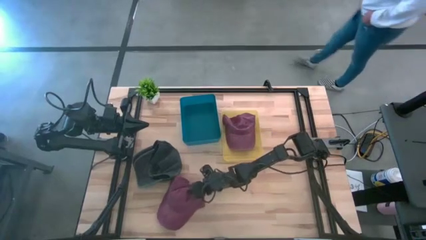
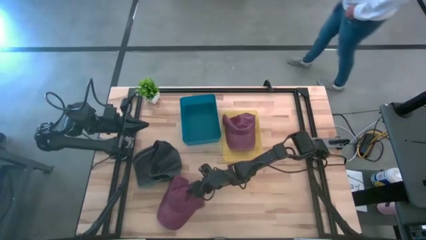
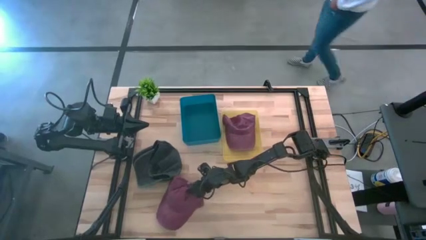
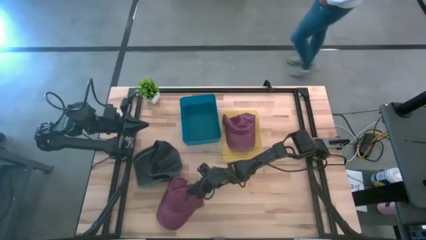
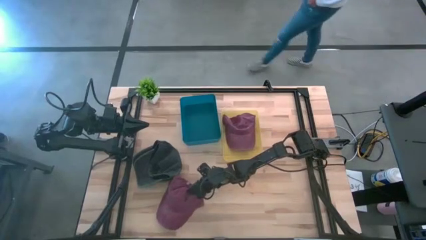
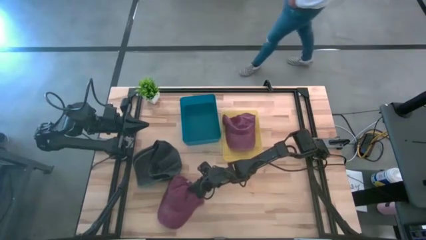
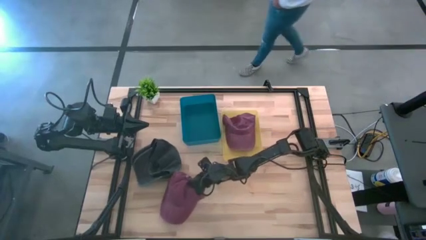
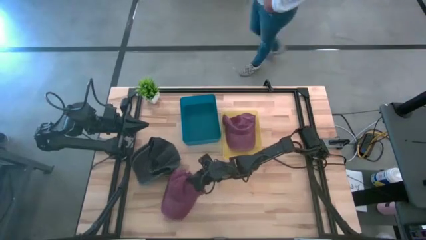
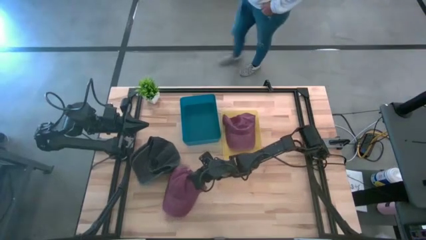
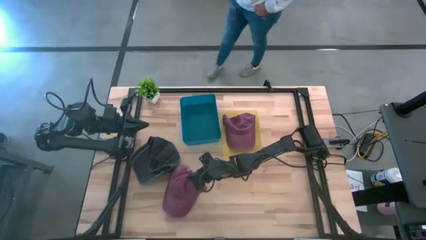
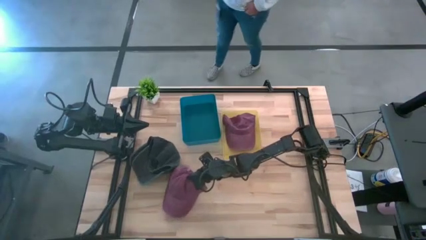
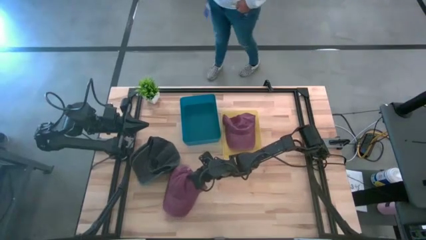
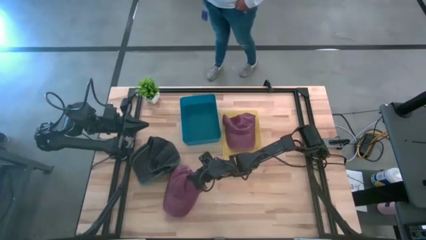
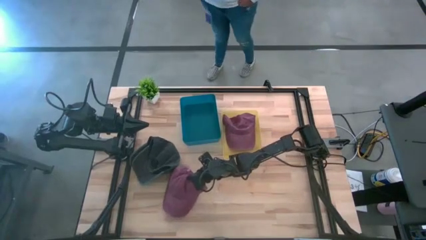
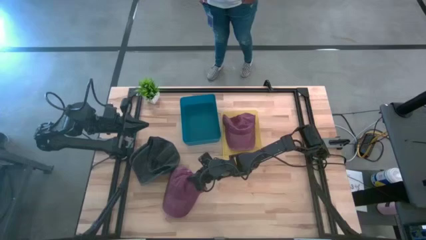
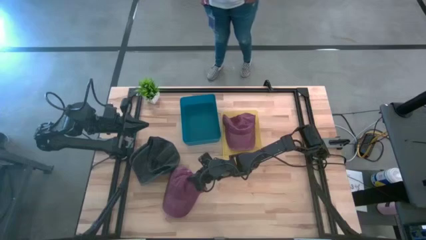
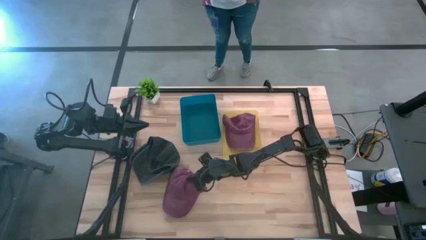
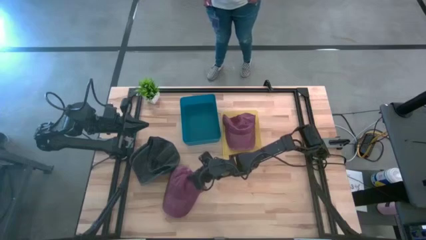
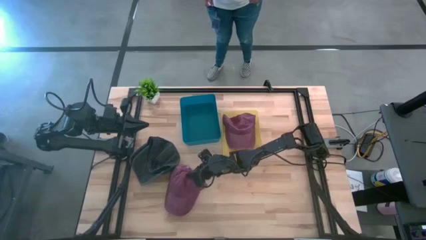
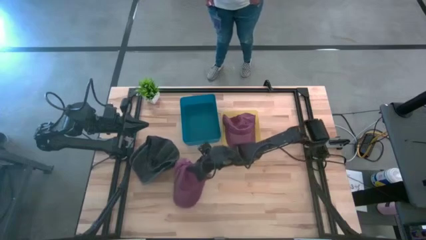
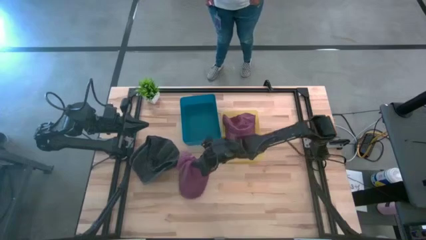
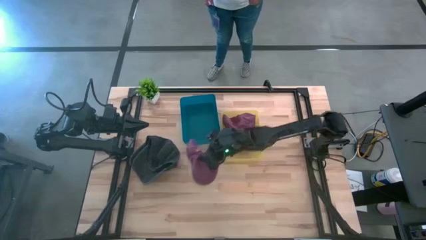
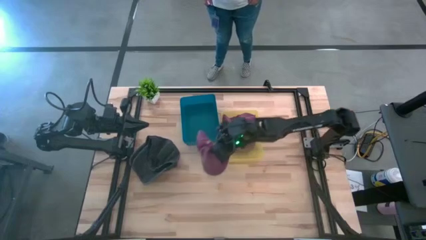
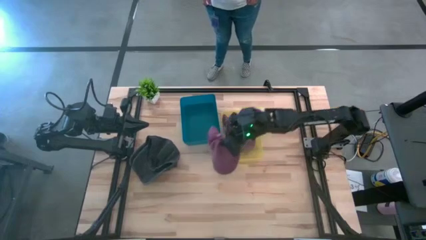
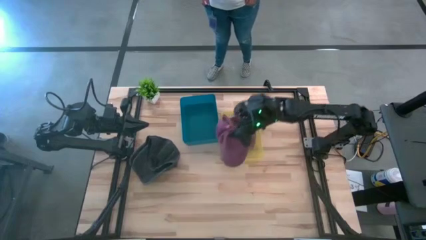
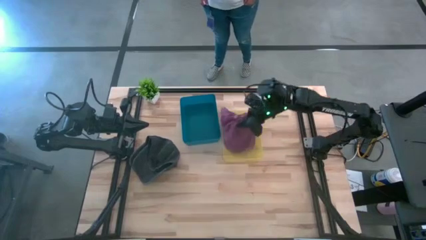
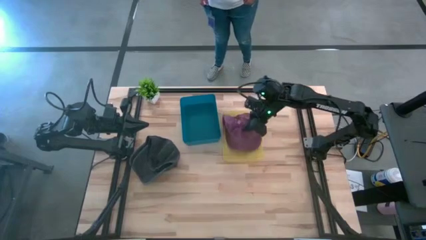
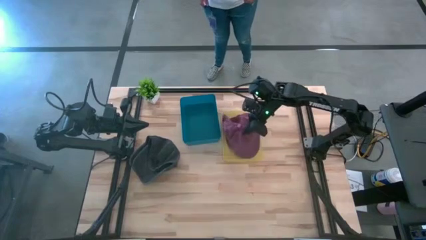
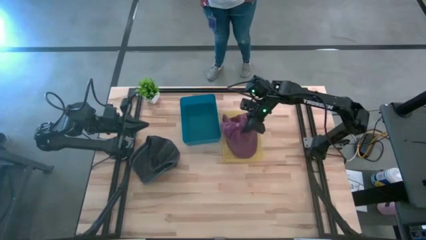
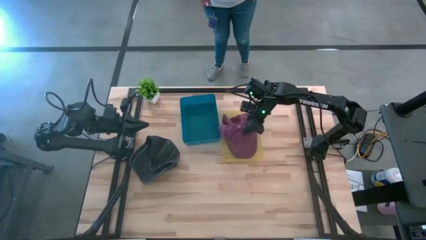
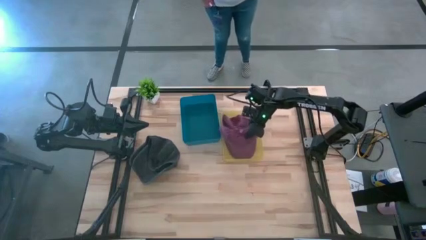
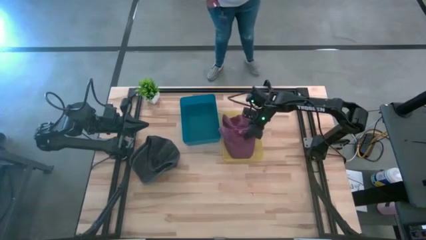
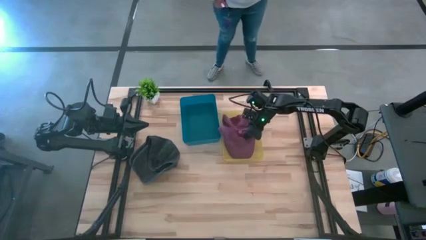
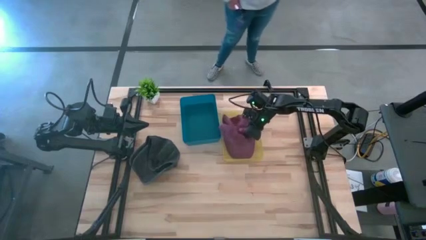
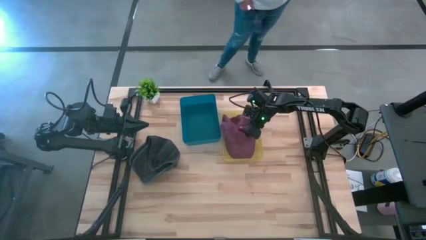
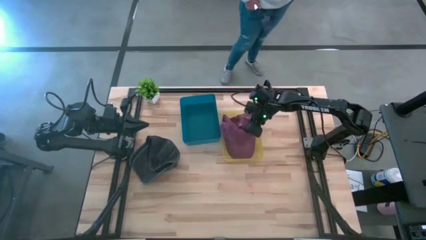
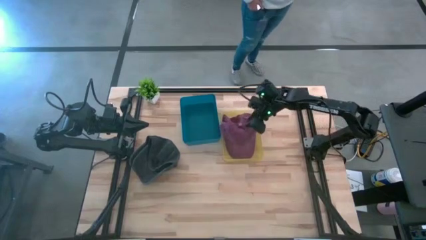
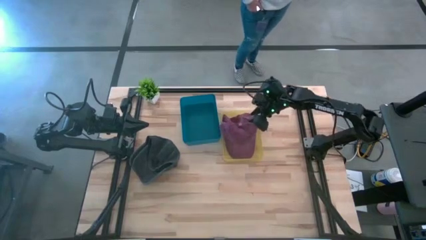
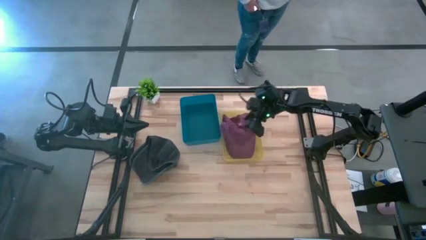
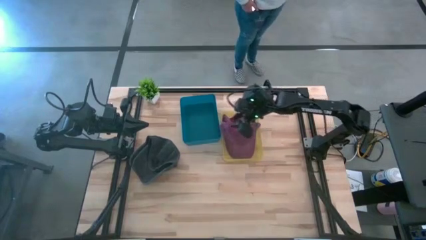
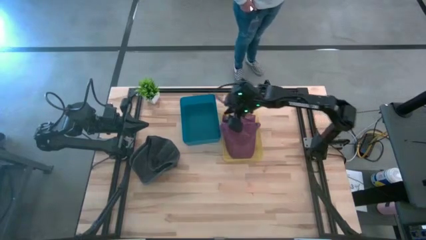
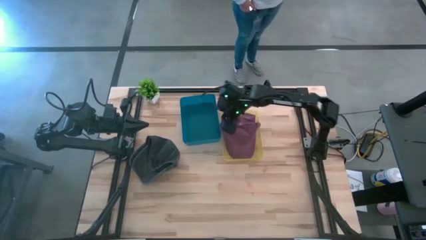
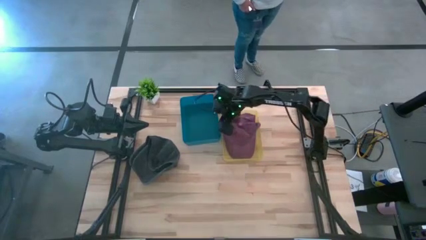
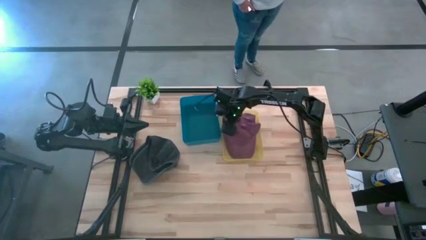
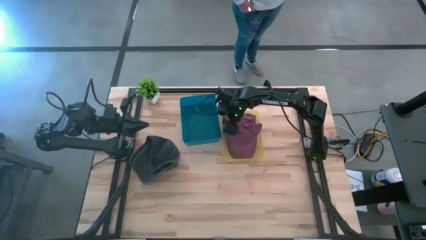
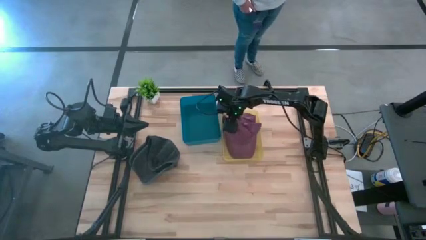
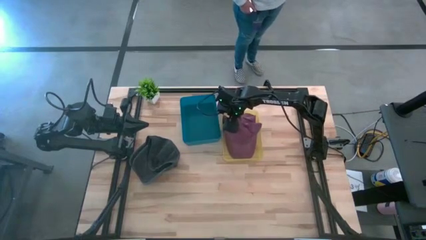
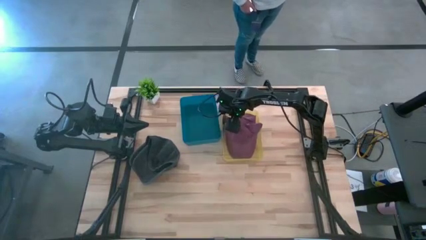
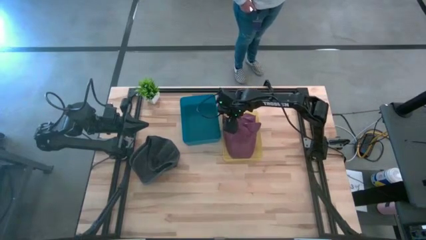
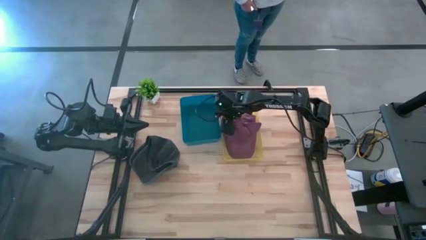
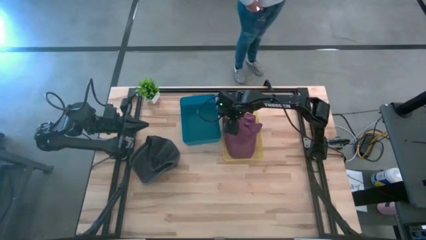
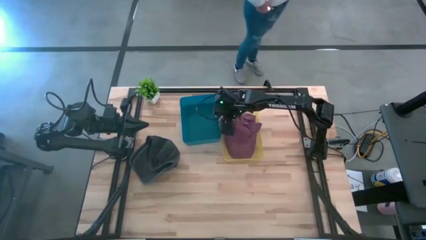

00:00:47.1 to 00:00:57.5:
Task: Pick & Place hat
Put the red cap into the yellow bin
